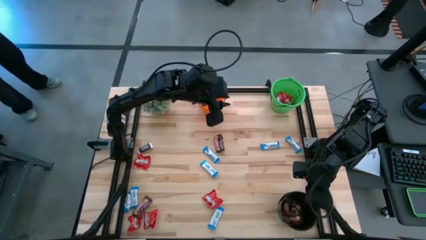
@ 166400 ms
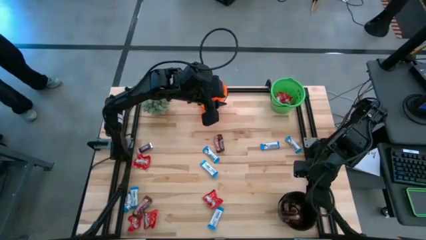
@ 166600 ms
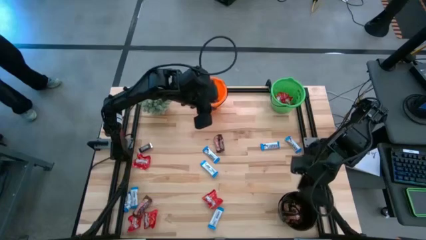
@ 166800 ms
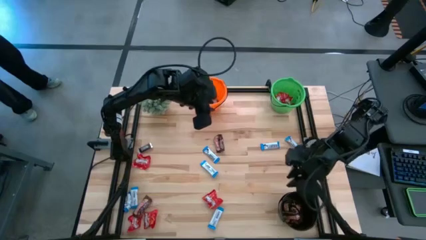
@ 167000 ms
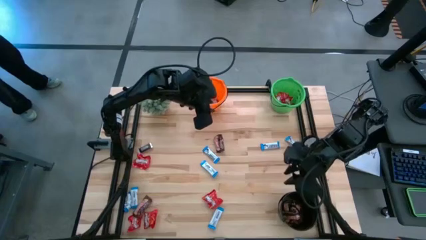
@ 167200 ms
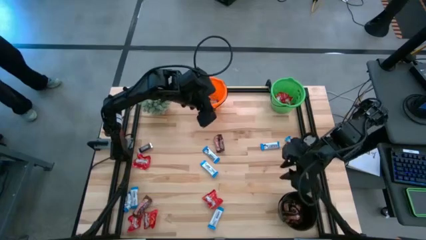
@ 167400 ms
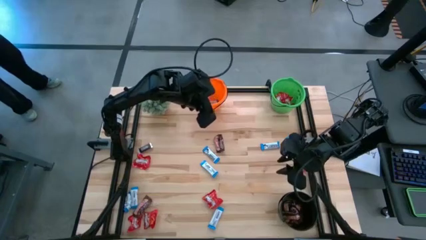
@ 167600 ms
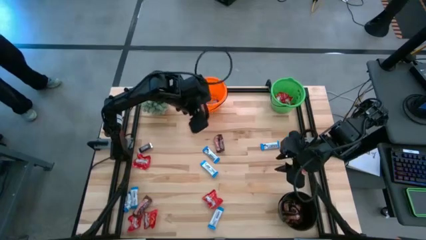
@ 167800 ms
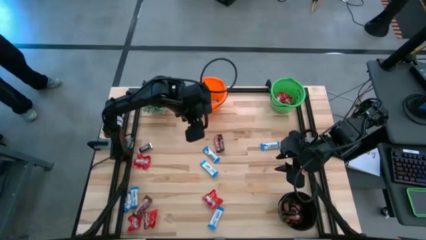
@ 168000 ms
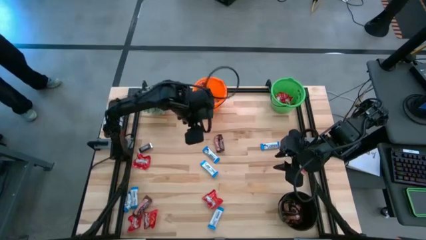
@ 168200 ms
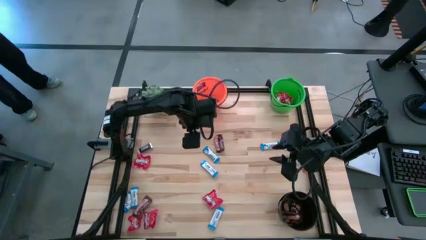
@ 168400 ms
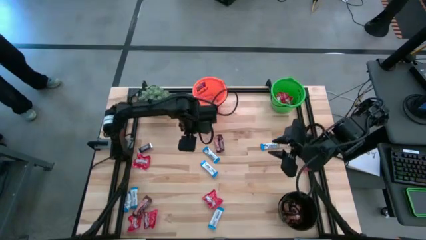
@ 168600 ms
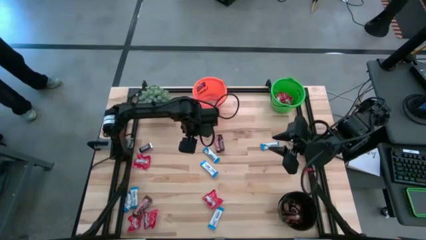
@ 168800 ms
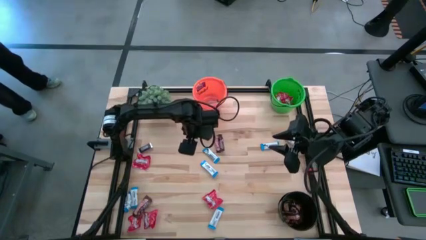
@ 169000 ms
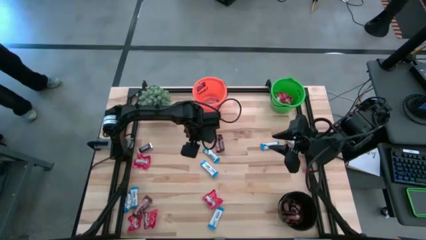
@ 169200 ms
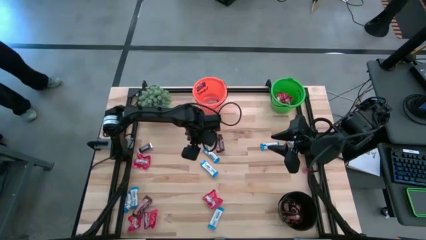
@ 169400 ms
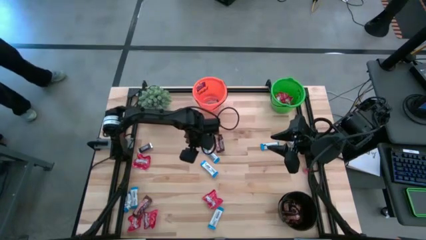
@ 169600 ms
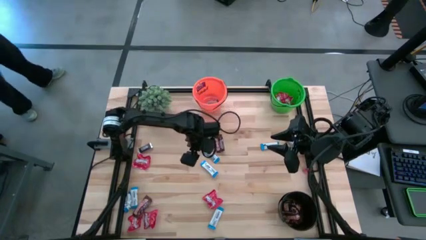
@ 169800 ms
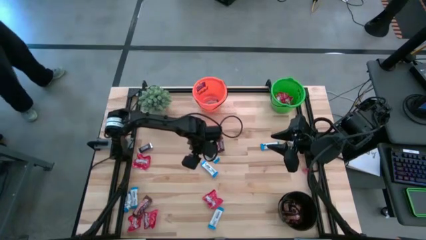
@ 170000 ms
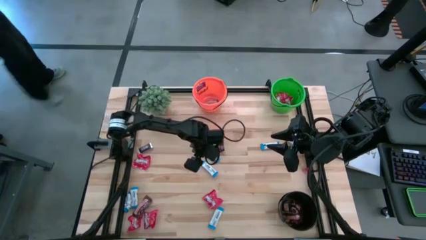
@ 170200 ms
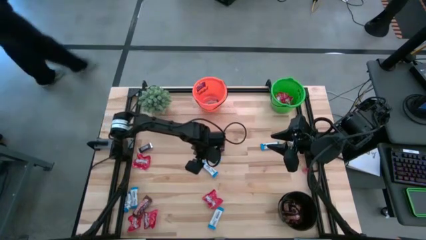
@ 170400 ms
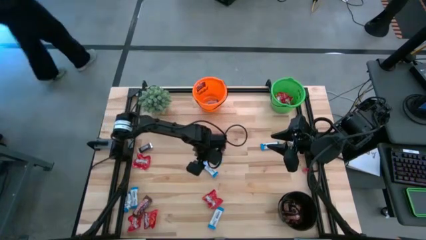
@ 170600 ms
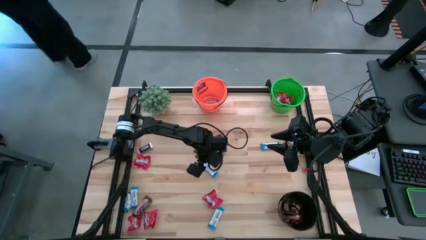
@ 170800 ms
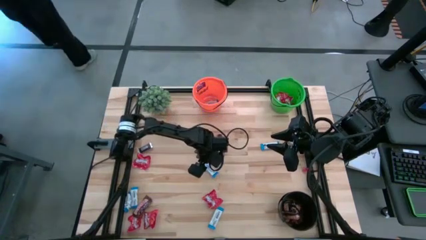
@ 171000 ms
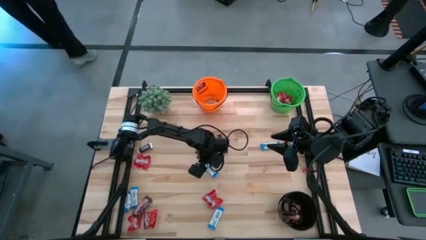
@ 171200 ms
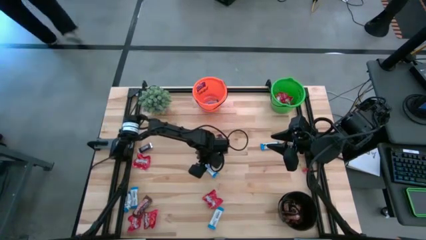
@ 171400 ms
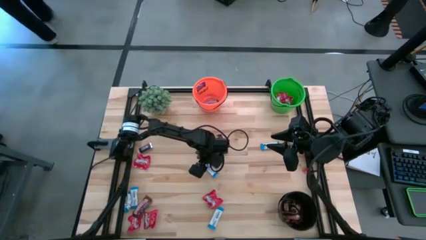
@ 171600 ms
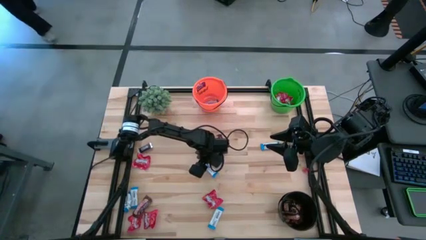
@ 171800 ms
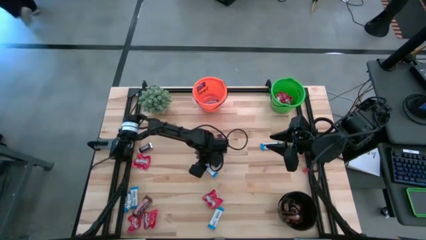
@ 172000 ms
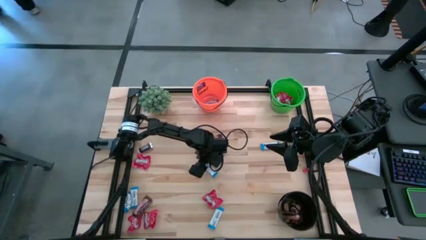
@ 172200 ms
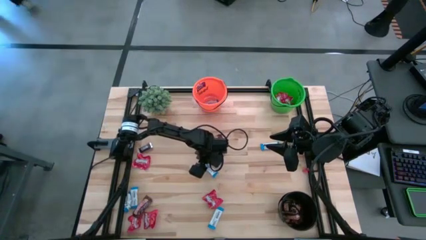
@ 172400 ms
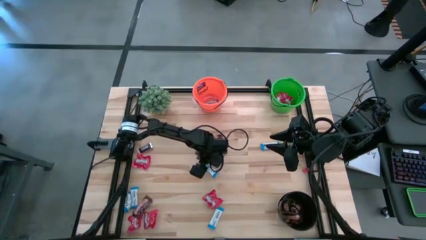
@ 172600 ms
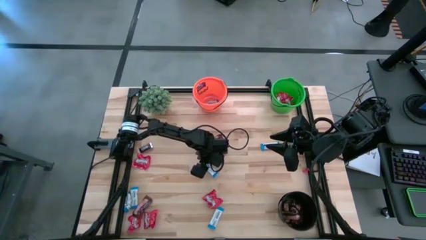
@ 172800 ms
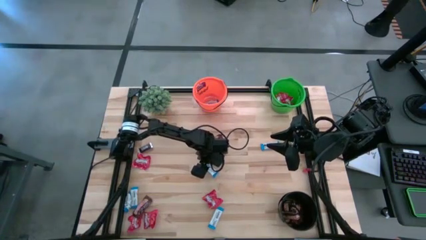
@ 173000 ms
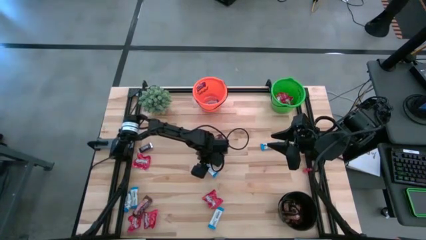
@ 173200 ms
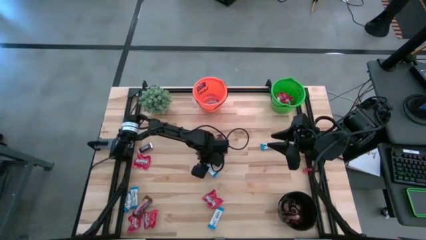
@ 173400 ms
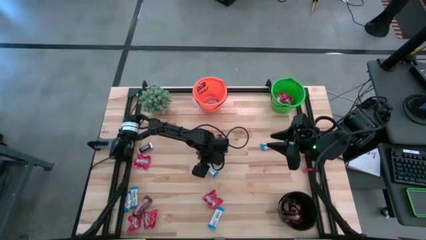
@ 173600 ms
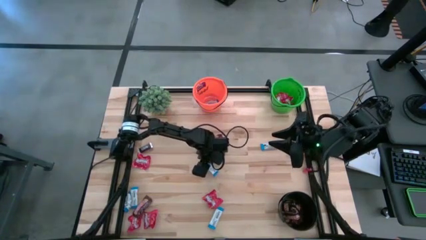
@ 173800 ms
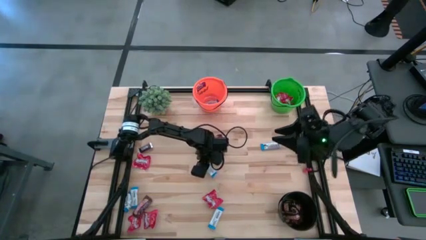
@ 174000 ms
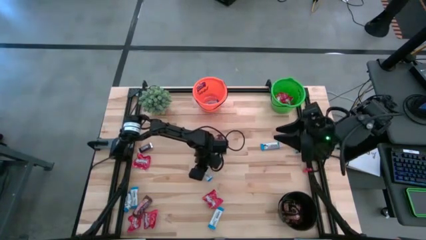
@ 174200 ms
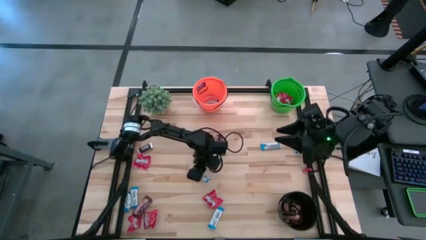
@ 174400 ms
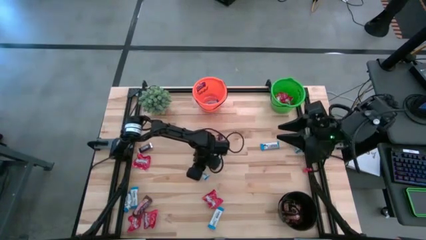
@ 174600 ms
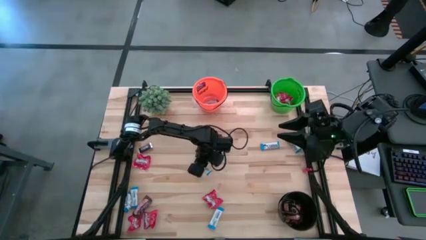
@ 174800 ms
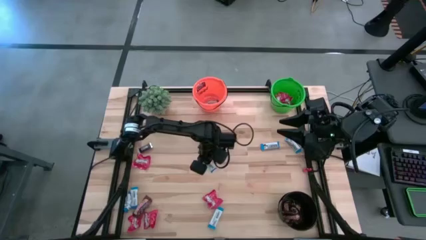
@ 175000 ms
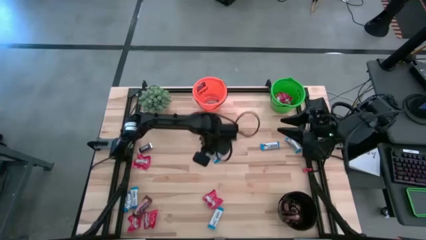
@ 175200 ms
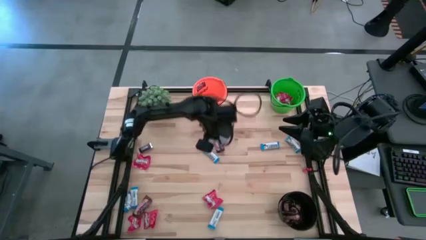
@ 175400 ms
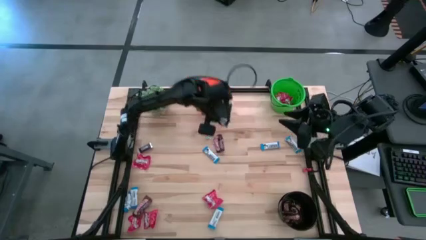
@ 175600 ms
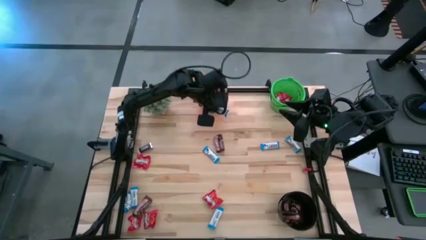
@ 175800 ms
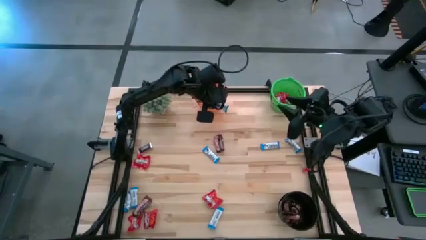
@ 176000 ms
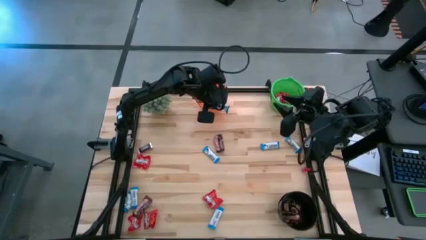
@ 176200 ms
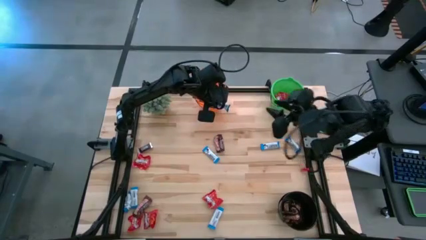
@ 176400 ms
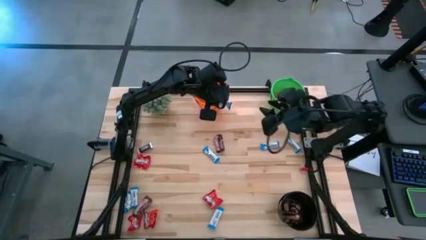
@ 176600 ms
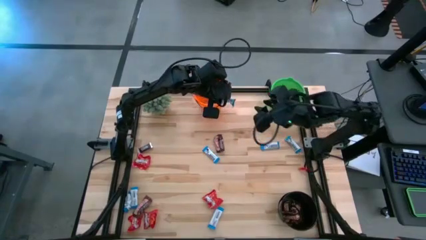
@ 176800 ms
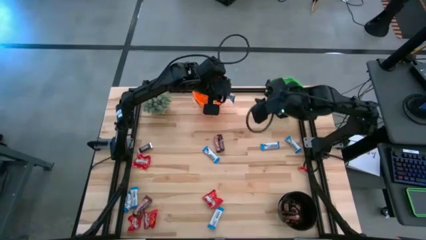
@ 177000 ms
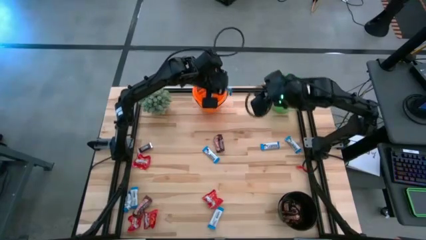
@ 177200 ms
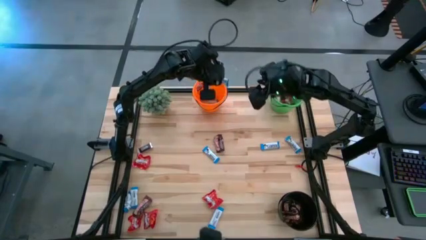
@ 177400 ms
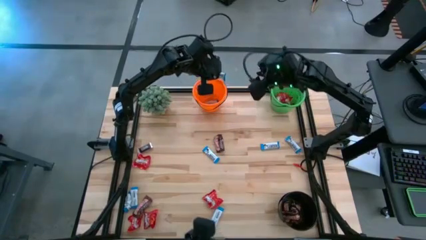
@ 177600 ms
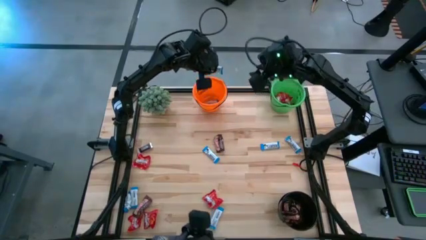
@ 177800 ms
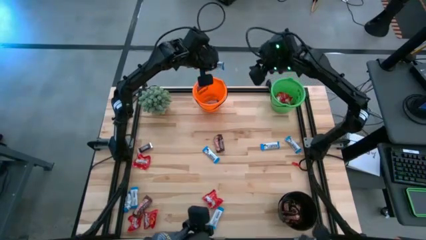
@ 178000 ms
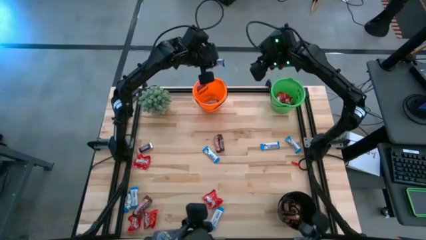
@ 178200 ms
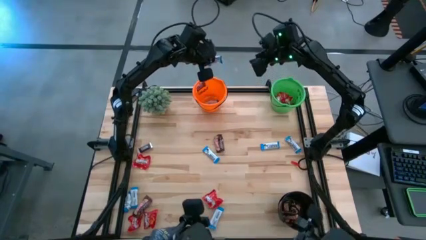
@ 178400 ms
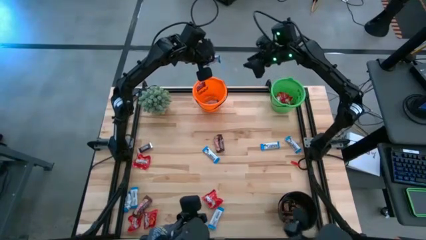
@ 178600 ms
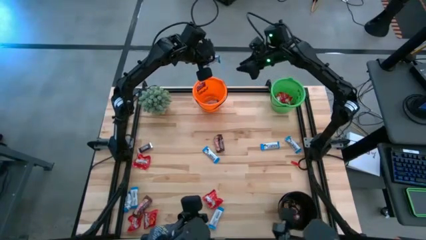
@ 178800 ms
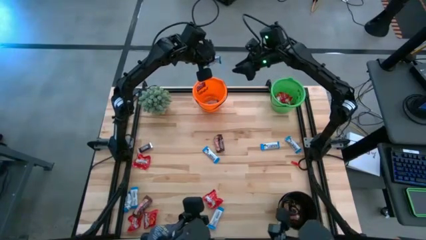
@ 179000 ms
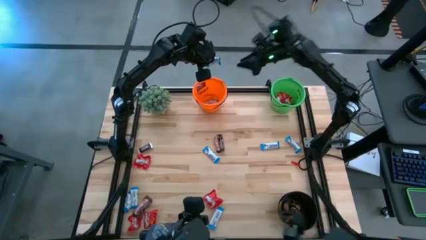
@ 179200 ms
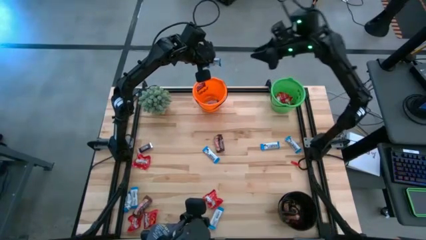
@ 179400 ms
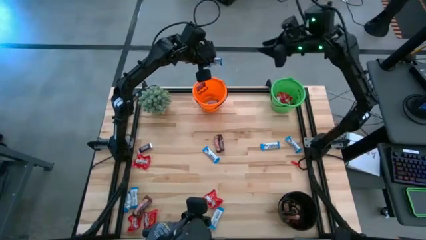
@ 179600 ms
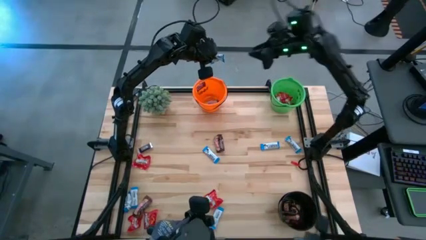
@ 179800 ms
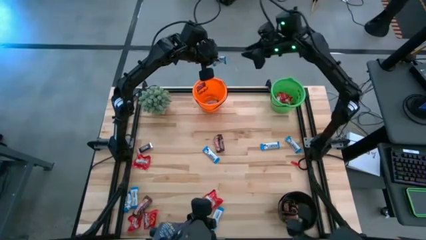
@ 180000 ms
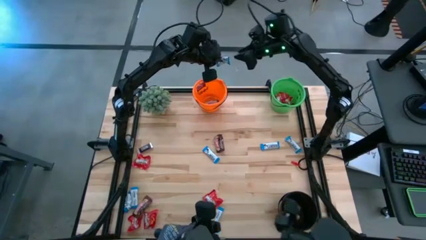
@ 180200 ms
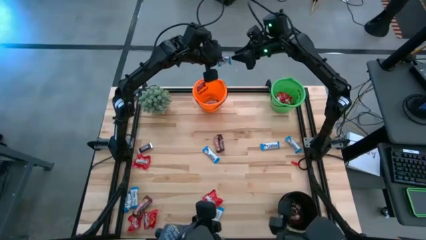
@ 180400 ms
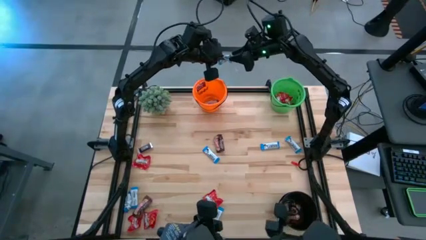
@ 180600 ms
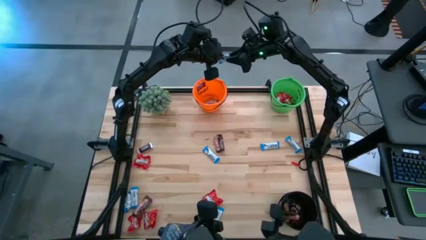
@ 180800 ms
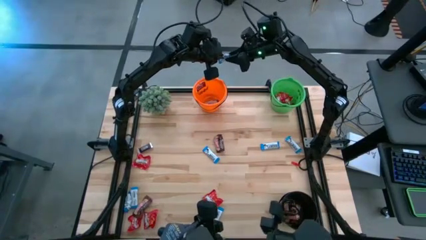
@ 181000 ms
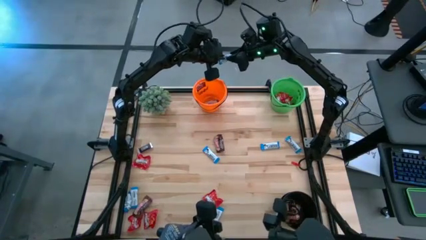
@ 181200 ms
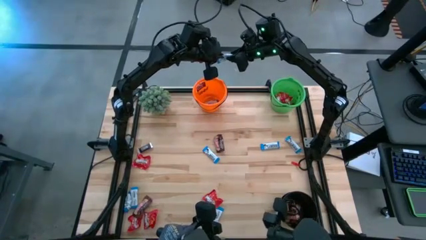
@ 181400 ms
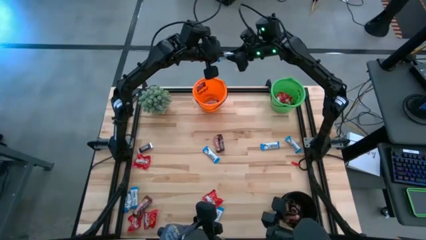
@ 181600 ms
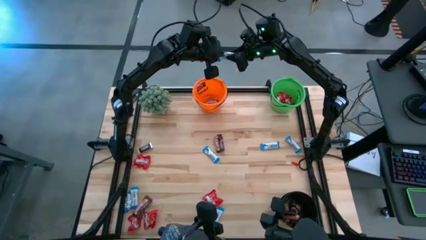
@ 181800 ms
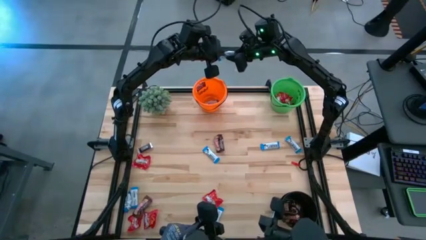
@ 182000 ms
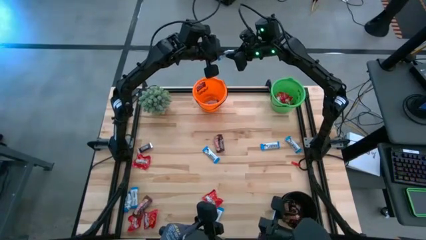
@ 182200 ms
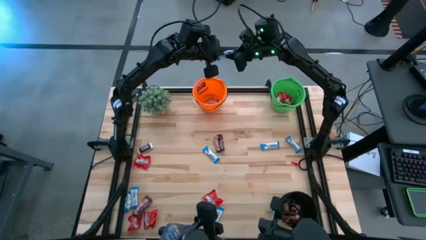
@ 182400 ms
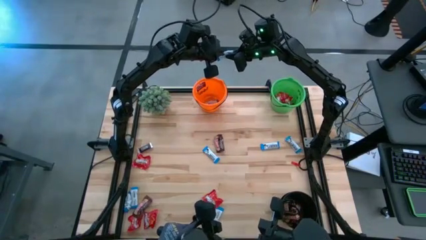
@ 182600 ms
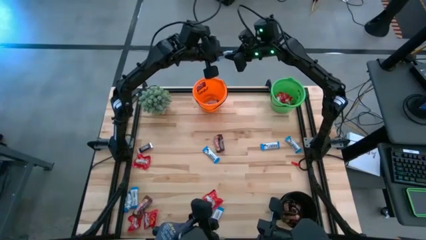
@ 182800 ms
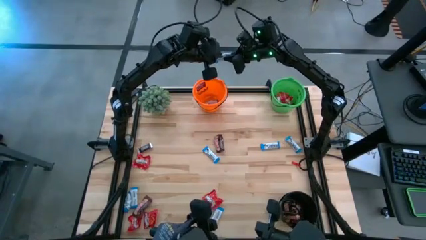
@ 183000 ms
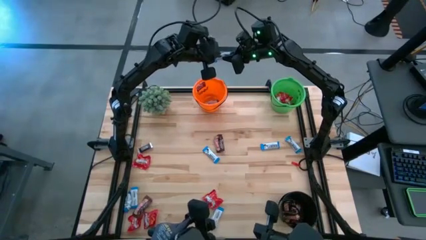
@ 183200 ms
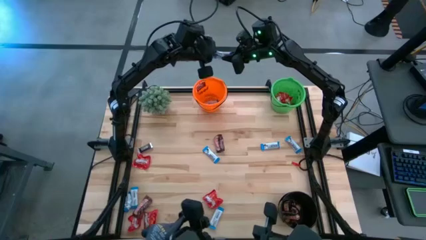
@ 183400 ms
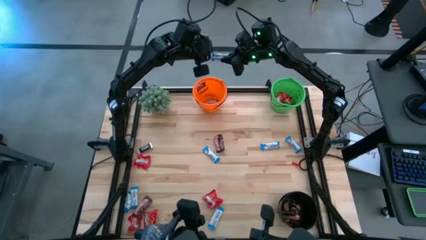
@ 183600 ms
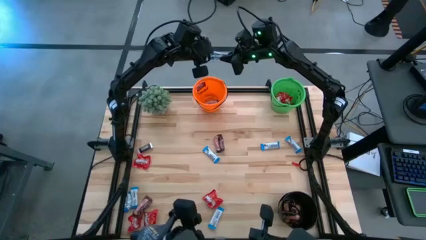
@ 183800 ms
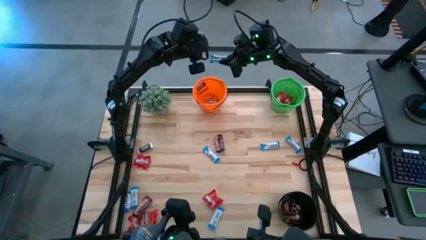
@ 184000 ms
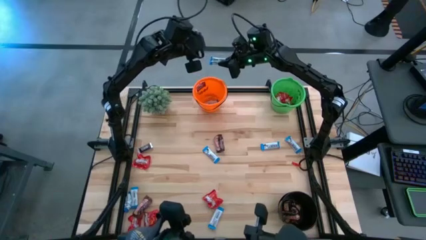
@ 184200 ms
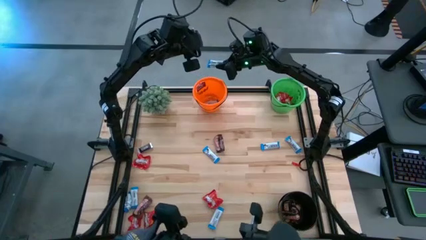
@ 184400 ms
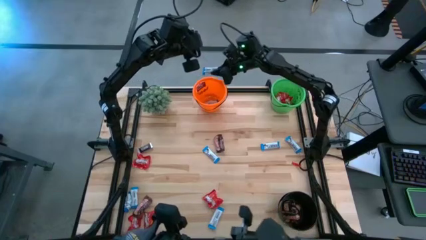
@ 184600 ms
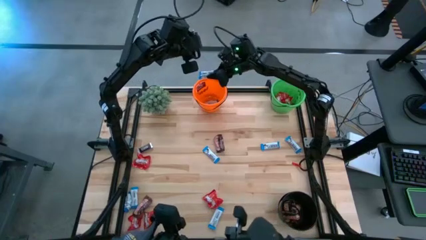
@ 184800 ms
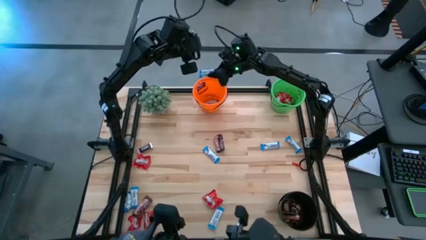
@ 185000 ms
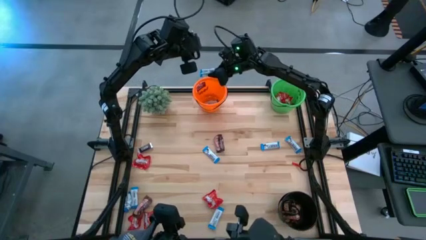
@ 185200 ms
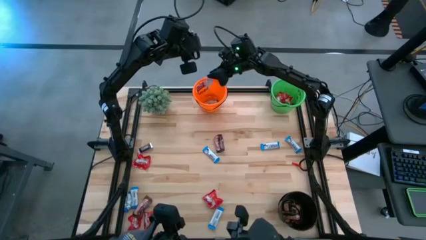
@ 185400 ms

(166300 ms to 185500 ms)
Task: Organize candy in baskets
Put the white chocolate bar into the orange bucket
